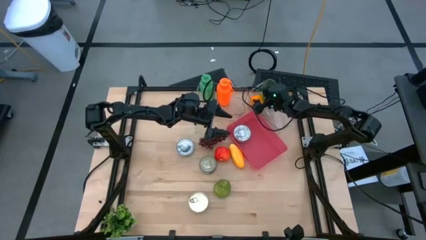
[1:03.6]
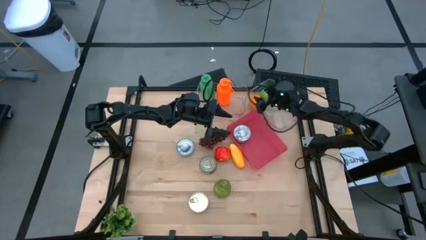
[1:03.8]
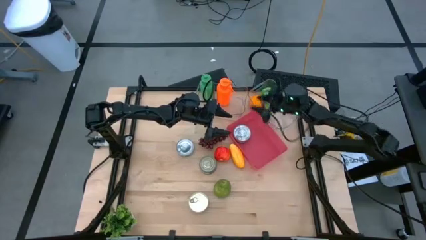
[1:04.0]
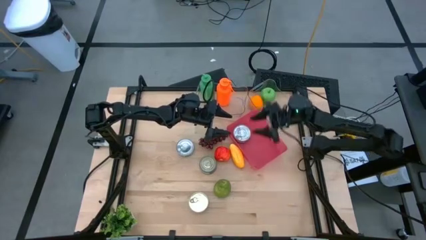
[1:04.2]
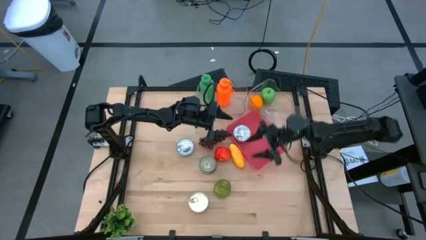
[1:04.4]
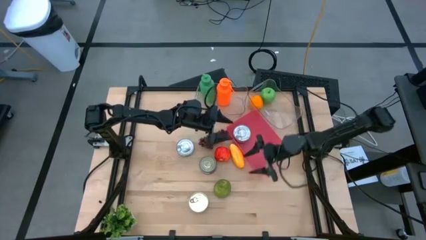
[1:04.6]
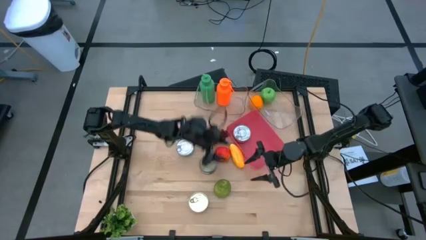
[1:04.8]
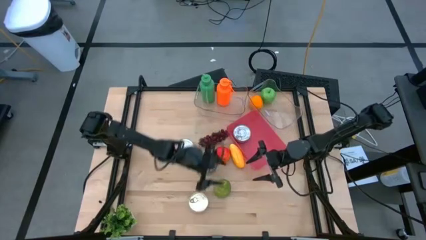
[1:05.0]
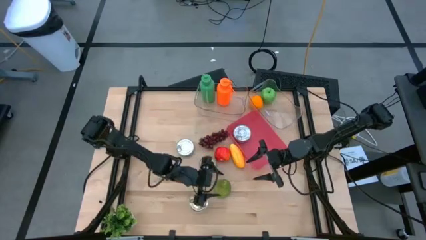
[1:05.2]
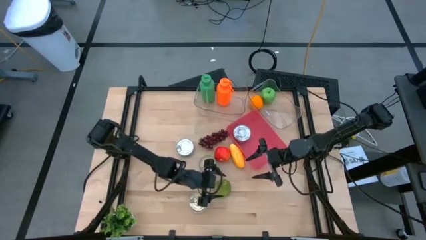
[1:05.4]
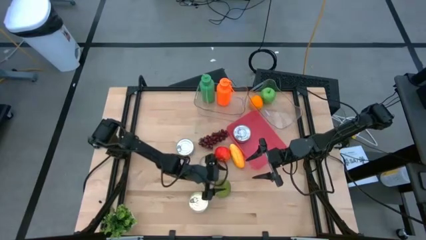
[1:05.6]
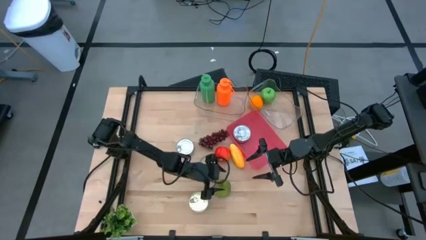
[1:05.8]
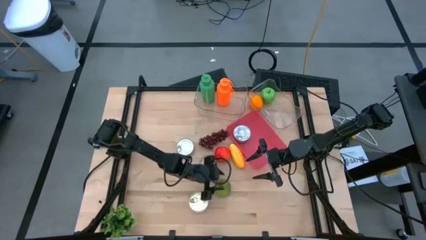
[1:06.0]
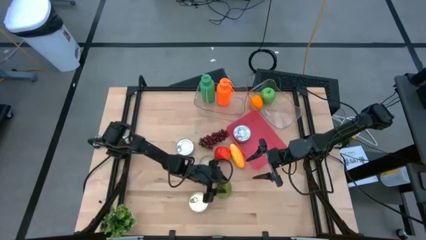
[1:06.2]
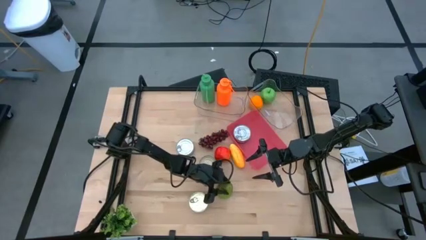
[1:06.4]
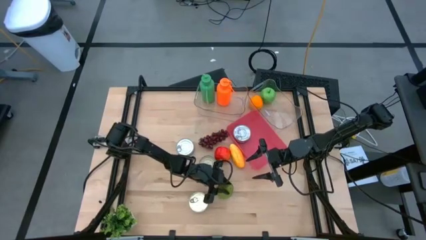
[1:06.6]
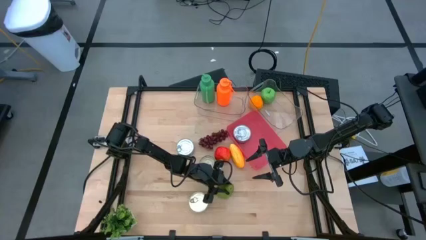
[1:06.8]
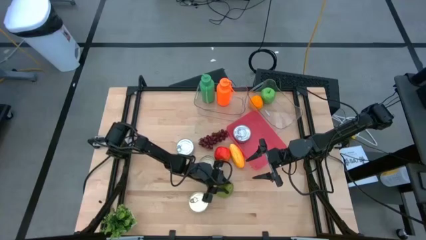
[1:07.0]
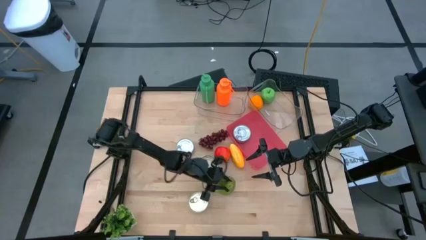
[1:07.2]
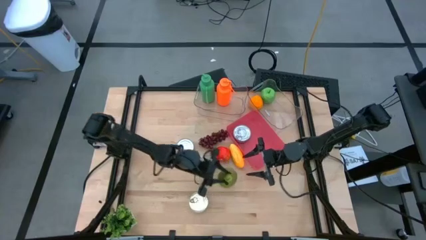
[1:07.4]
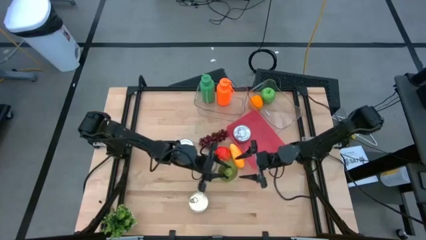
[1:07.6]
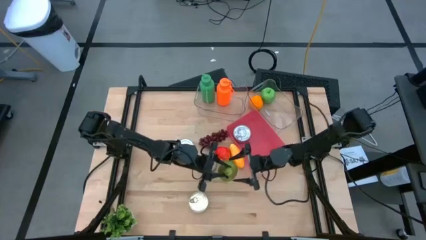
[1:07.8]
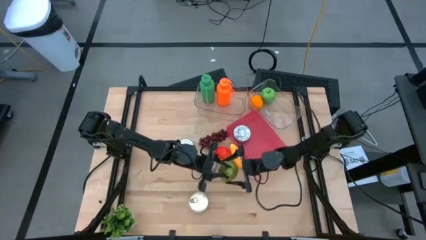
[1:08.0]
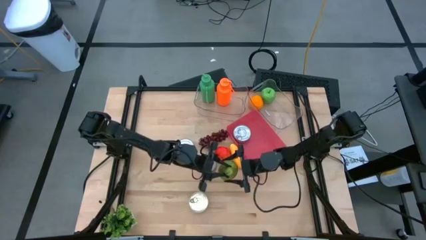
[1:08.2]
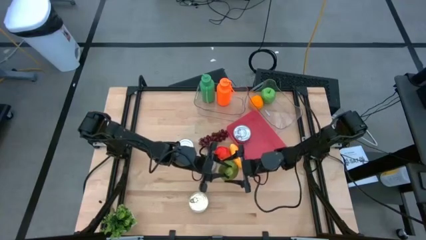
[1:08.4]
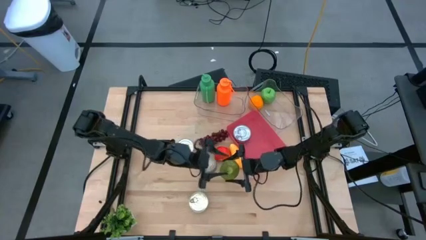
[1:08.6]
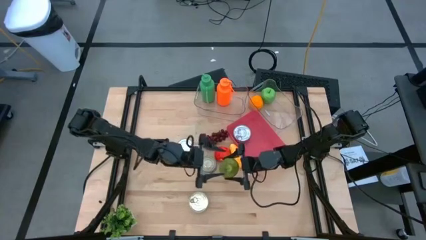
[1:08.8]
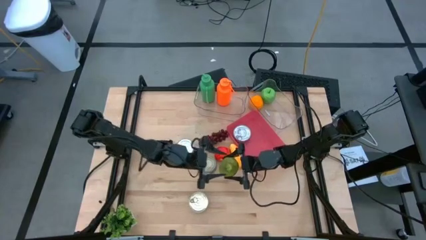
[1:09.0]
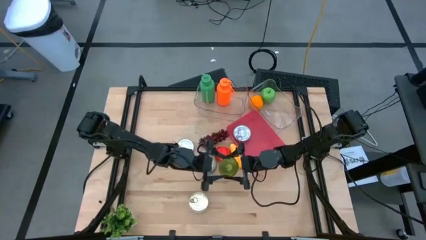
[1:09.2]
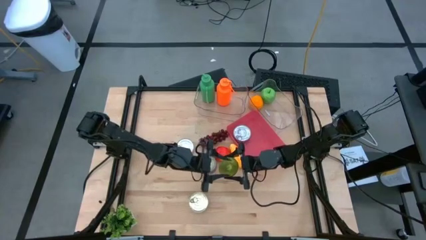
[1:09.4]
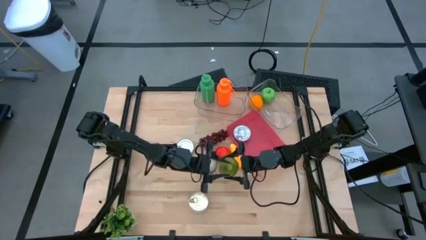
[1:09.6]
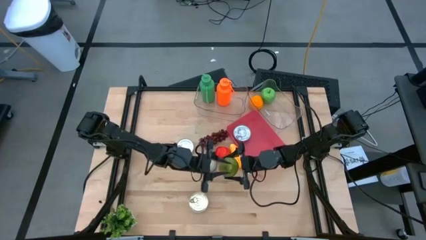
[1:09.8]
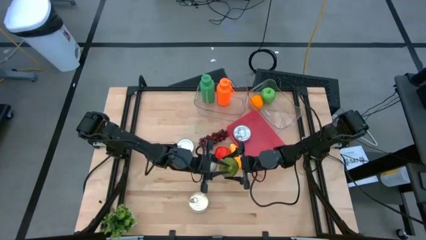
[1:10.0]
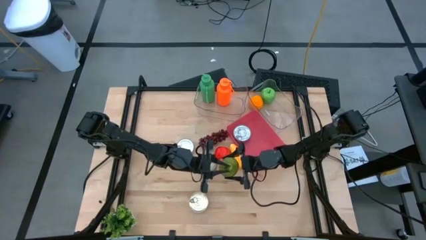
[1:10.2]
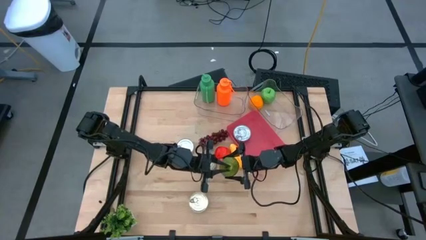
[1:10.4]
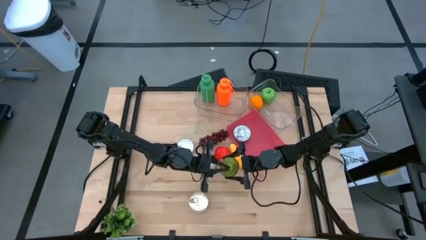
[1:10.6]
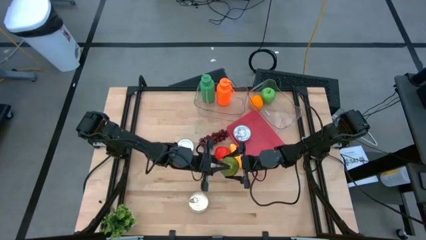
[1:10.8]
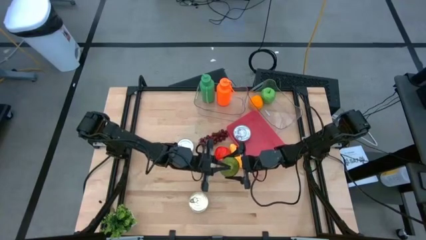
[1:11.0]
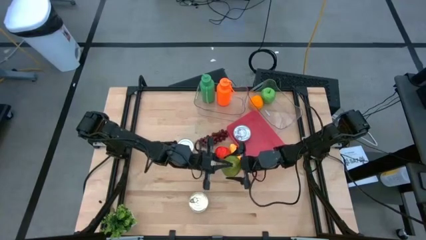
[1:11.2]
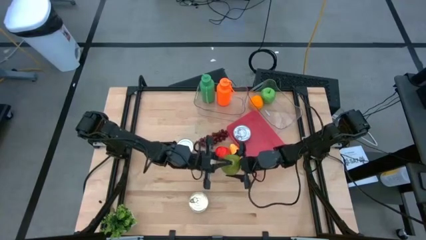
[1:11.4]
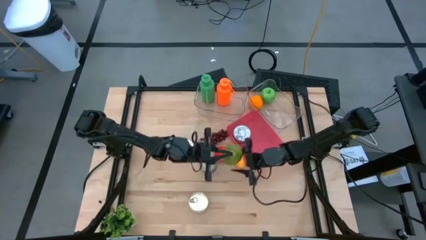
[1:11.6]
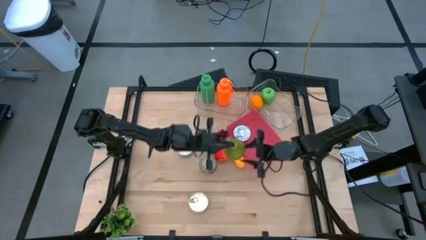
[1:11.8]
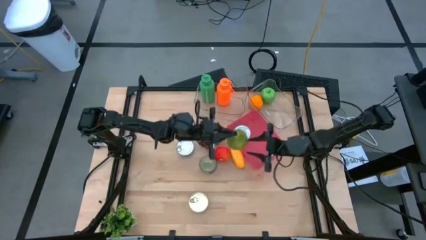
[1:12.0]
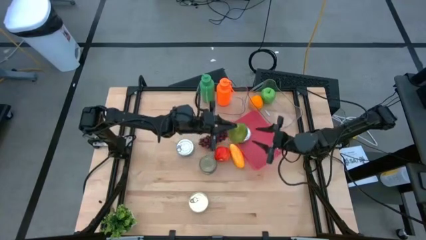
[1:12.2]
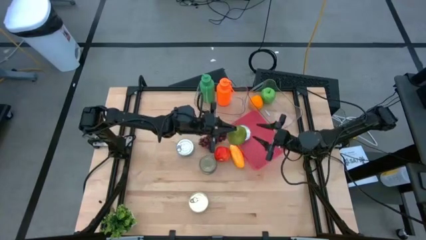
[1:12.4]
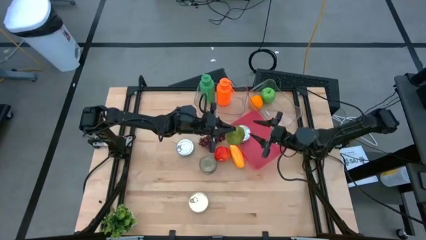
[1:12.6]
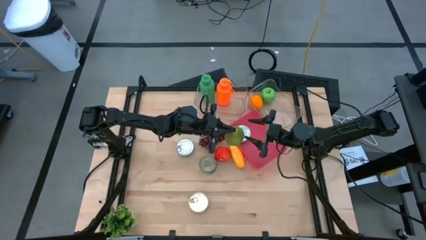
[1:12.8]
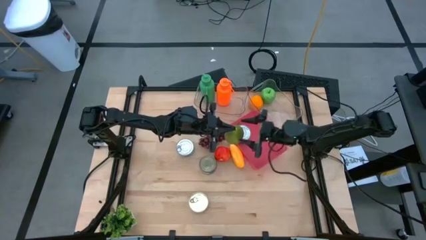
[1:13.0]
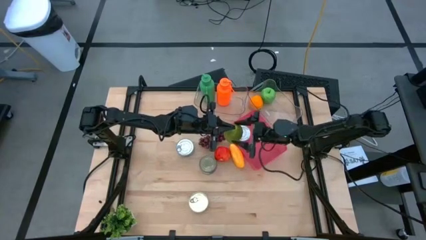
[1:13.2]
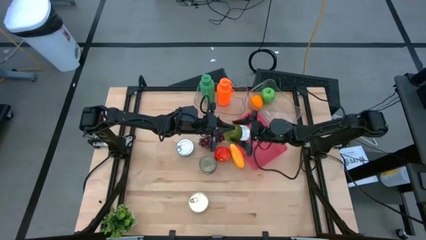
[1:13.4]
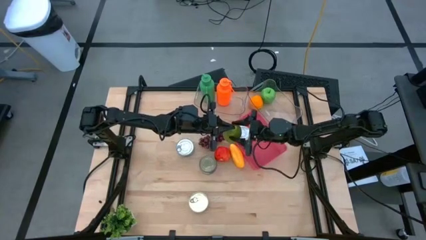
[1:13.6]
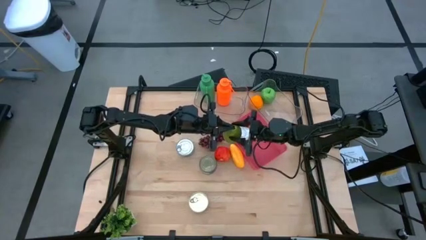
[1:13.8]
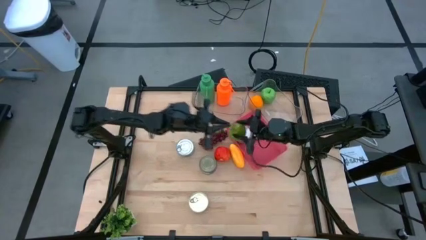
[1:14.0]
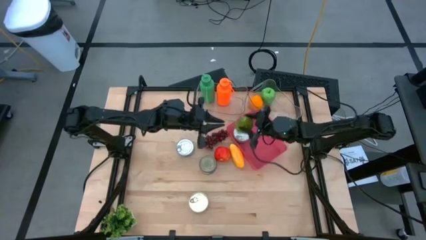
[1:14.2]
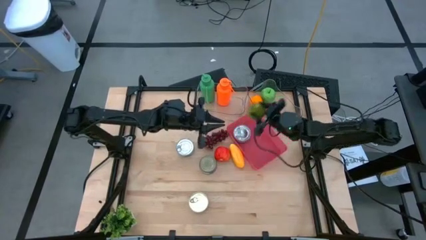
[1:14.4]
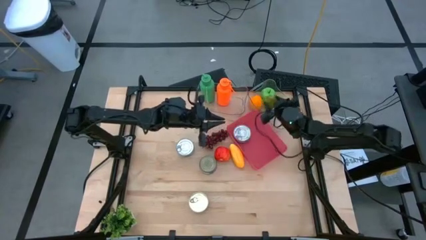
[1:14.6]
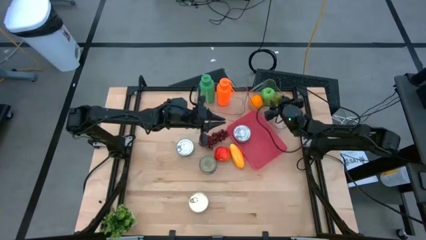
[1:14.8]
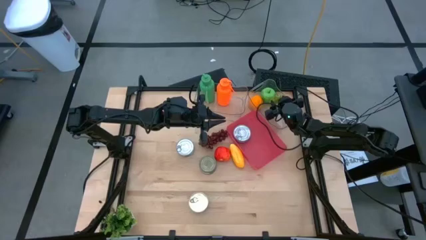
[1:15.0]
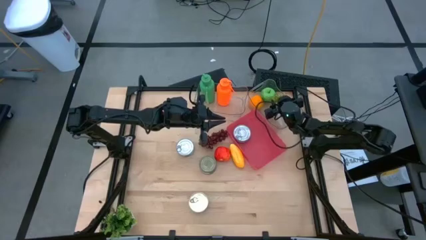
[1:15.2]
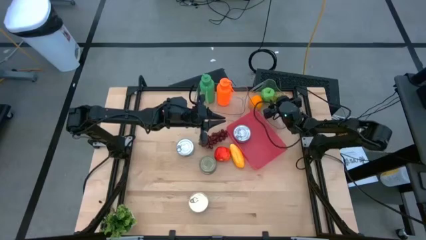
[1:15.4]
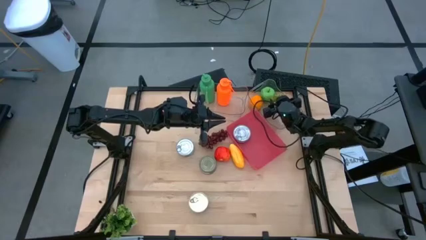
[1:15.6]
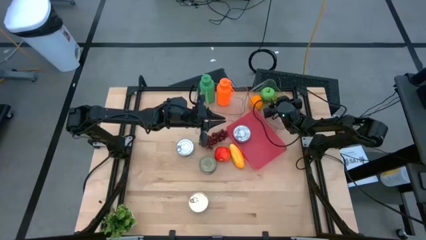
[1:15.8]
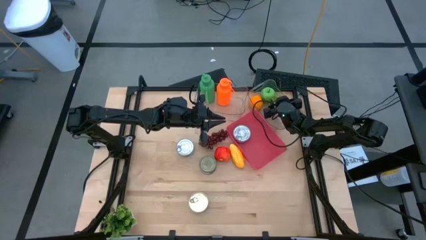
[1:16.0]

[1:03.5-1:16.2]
Task: Pick & Place Food Item
Put the green pear into the right transparent bin
